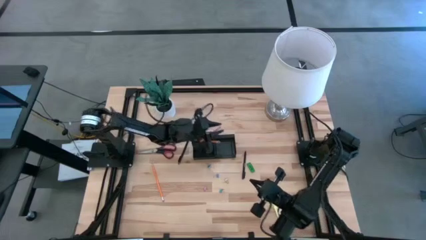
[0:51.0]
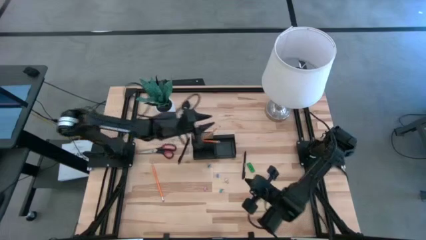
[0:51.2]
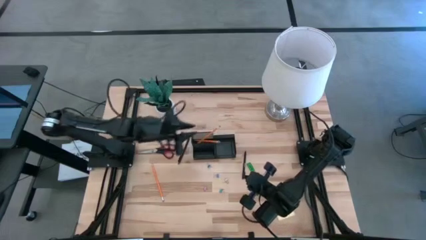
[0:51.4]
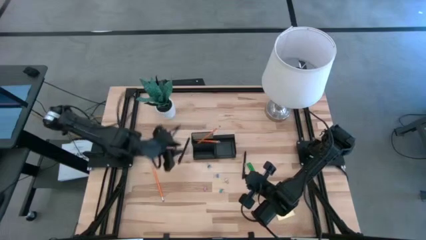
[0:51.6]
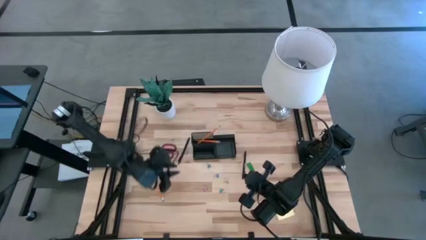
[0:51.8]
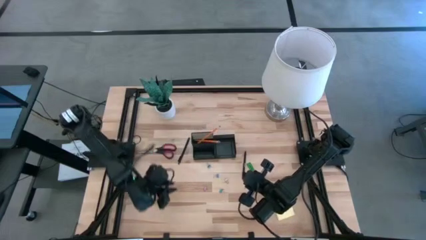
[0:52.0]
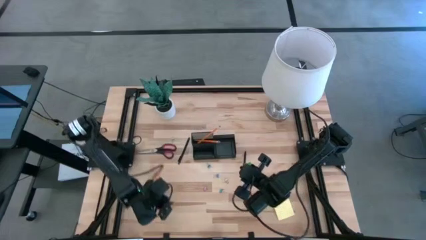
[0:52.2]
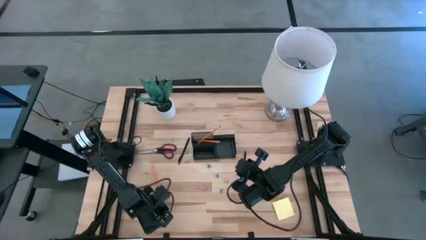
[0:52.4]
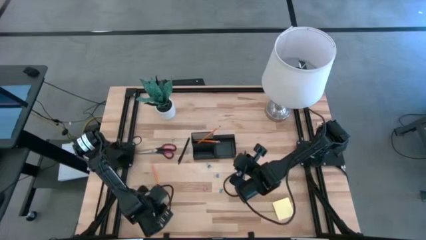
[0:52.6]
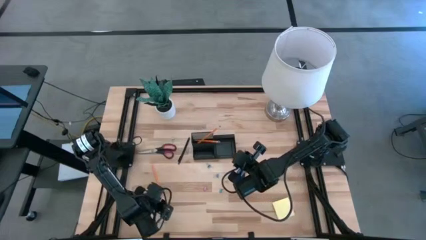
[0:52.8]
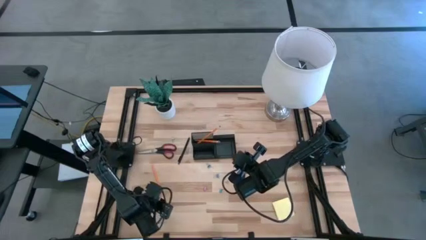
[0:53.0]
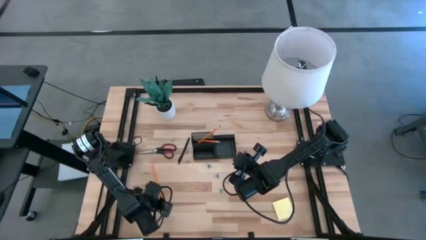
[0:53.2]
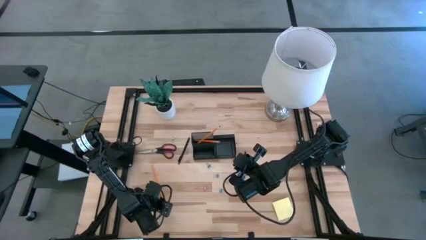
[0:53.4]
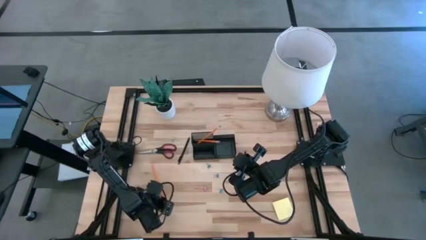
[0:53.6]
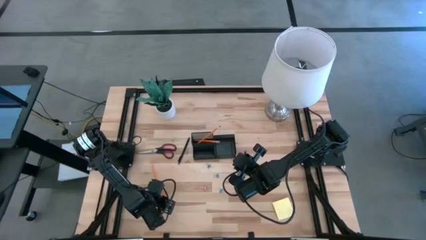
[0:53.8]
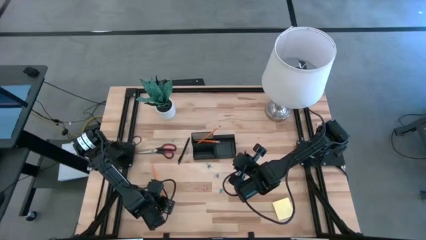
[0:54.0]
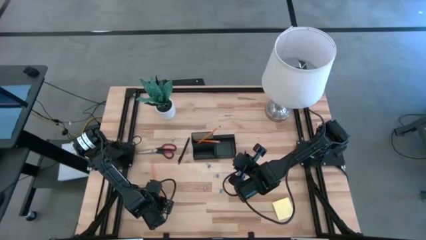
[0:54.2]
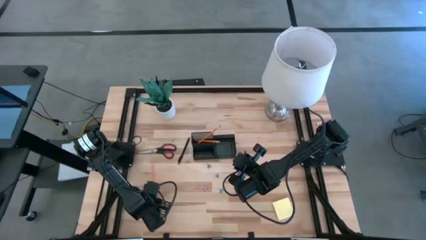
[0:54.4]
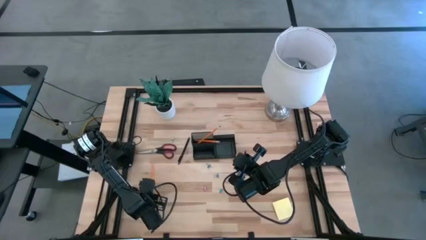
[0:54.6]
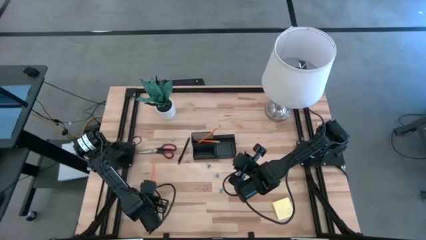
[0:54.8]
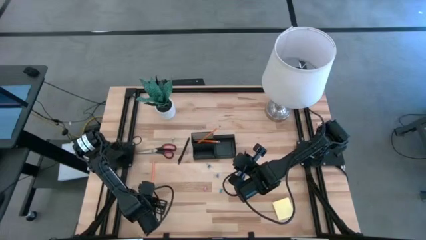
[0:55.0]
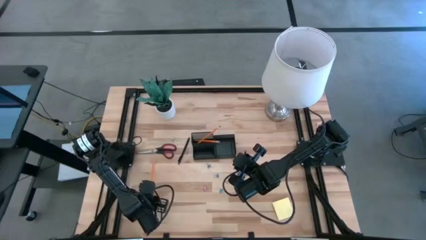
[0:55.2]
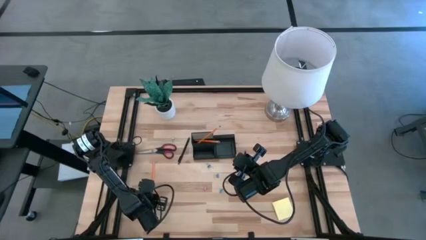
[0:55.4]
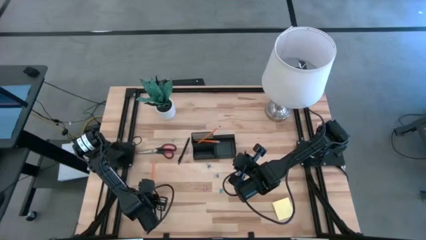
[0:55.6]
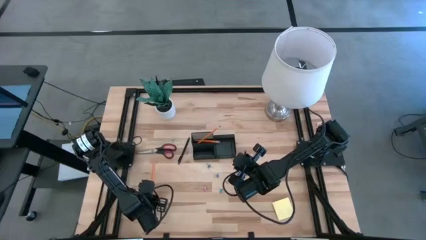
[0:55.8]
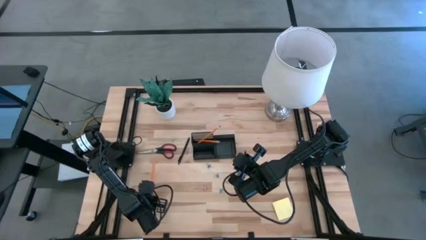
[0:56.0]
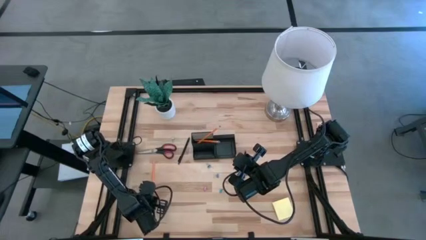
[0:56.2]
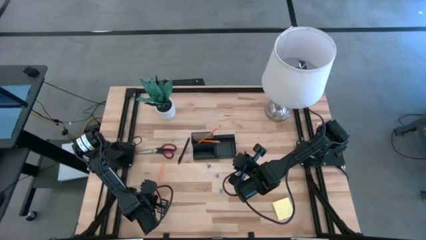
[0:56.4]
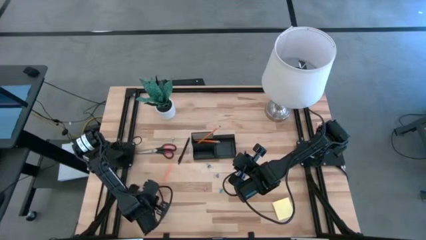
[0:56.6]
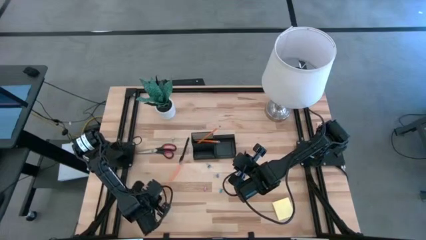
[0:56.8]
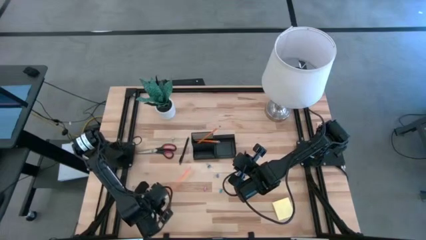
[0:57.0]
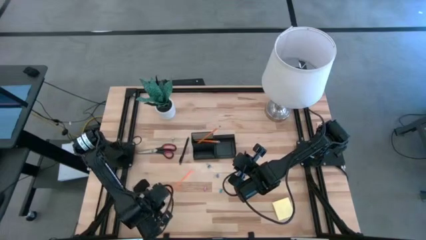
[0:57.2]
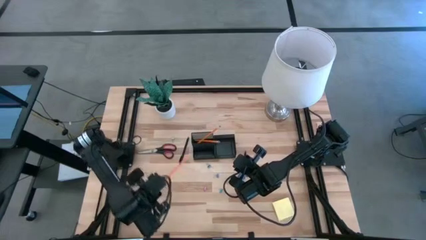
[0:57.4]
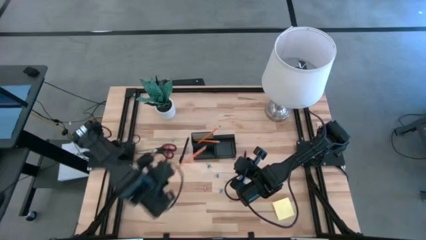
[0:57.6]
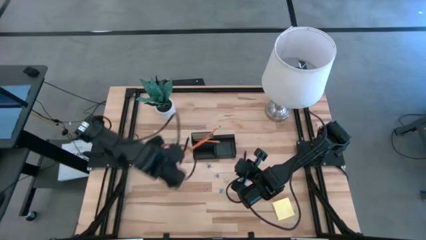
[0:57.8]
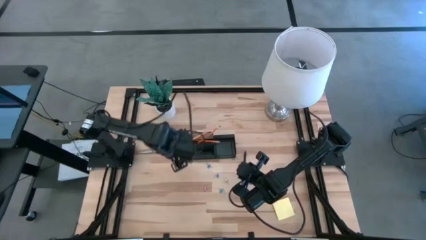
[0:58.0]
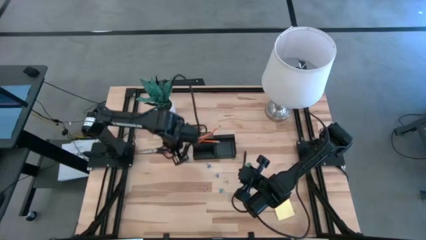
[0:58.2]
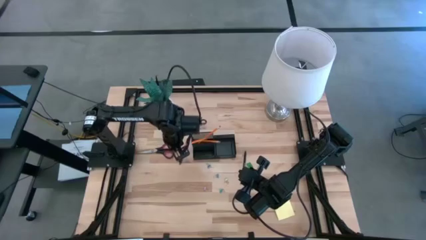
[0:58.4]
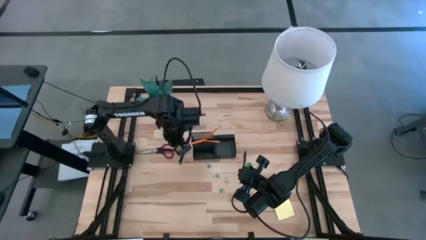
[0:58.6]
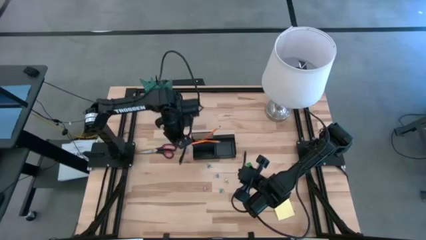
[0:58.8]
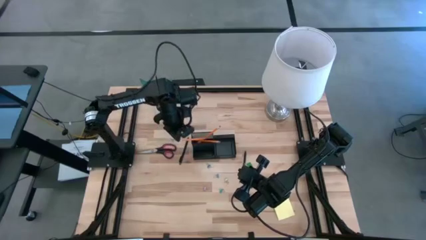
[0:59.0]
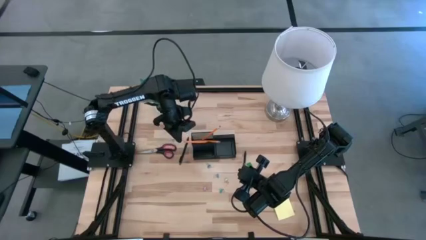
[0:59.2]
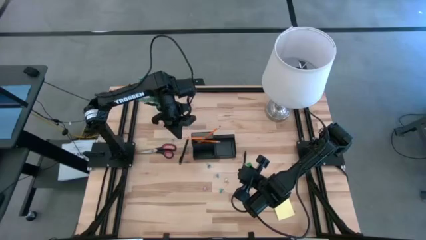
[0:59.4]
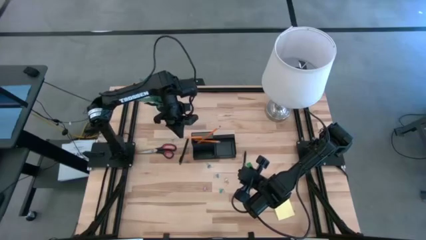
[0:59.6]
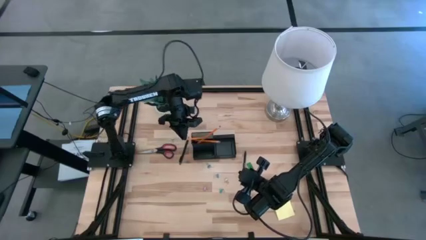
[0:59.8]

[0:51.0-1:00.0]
Task: Pick and place office supplies into organizer
Put the orange pencil into the black desk organizer

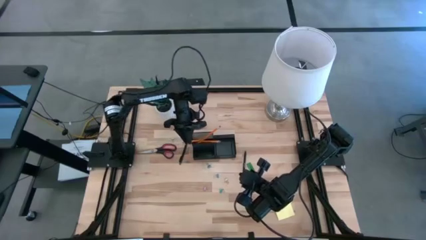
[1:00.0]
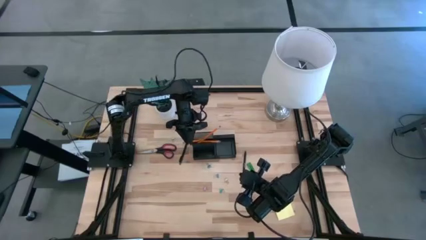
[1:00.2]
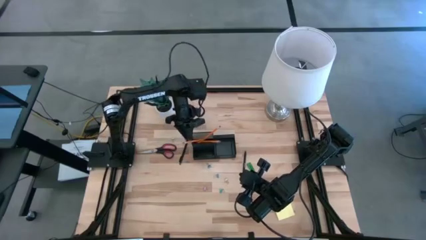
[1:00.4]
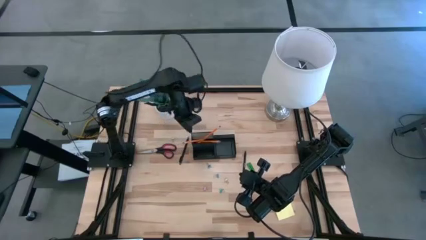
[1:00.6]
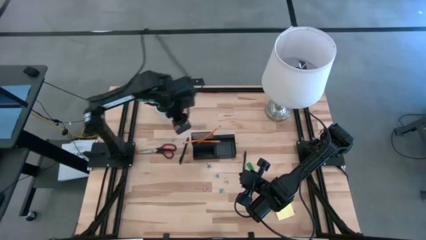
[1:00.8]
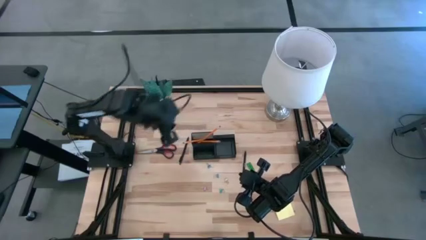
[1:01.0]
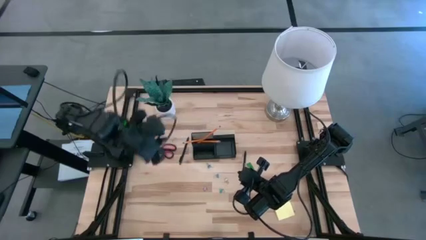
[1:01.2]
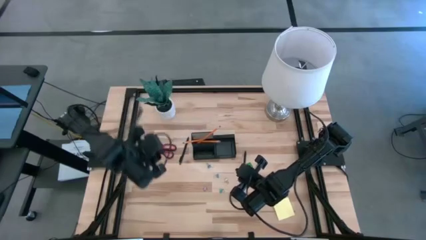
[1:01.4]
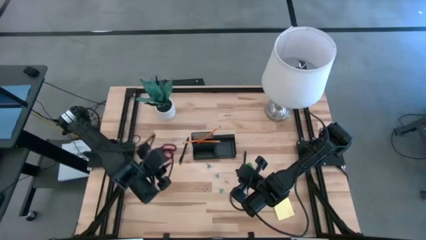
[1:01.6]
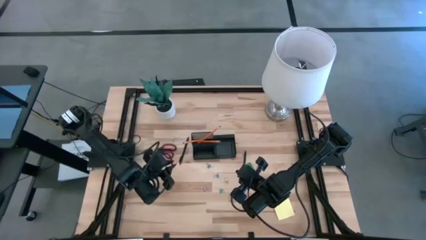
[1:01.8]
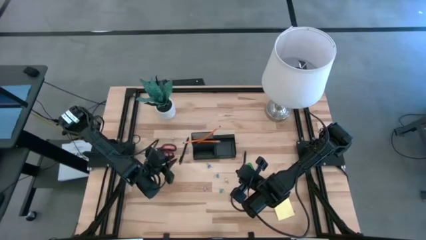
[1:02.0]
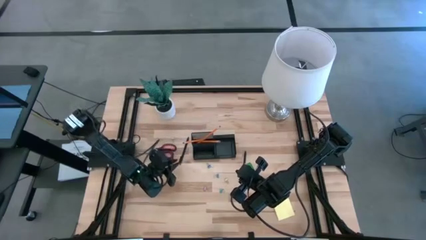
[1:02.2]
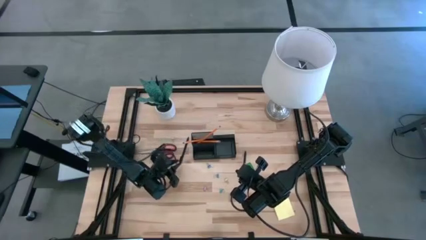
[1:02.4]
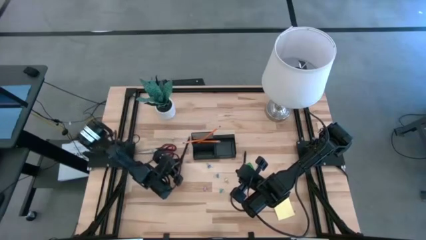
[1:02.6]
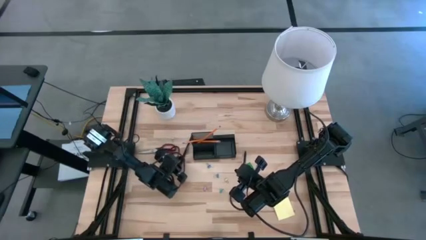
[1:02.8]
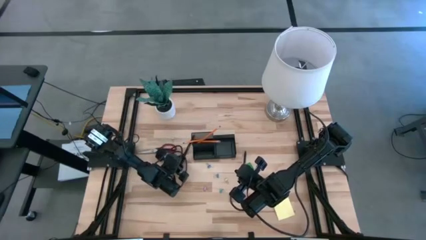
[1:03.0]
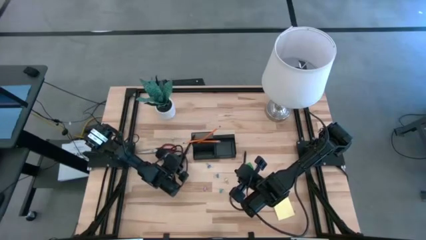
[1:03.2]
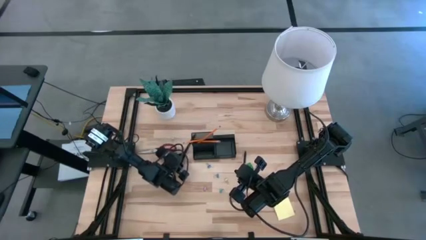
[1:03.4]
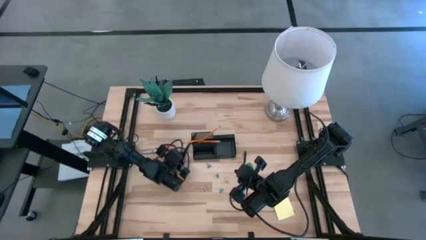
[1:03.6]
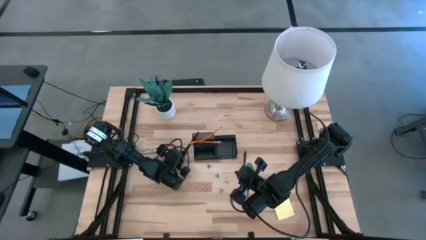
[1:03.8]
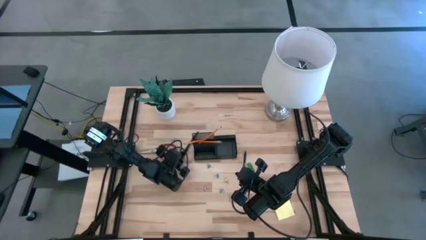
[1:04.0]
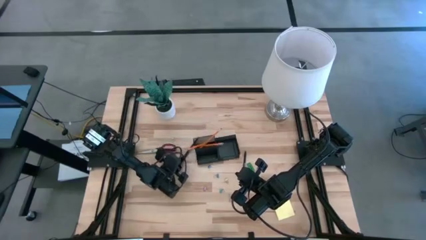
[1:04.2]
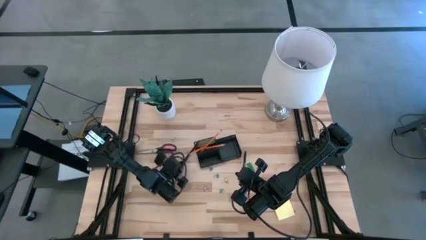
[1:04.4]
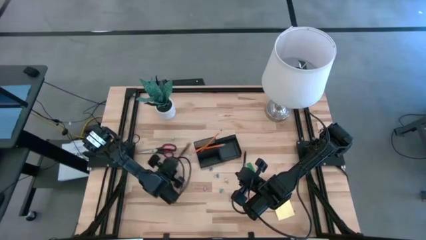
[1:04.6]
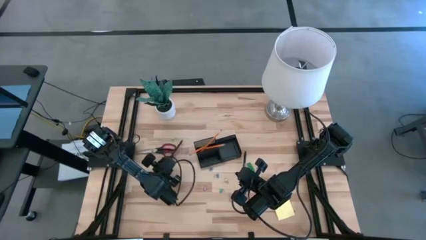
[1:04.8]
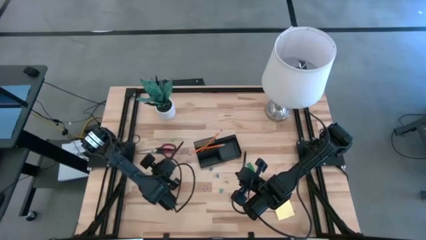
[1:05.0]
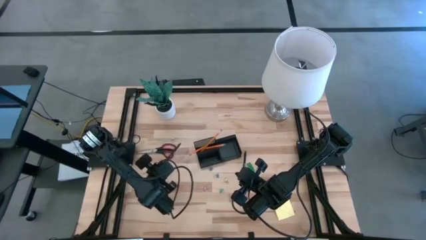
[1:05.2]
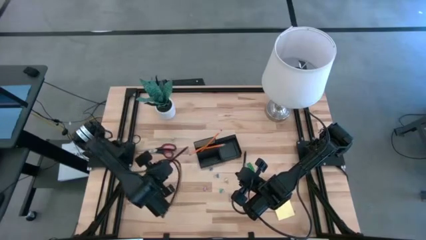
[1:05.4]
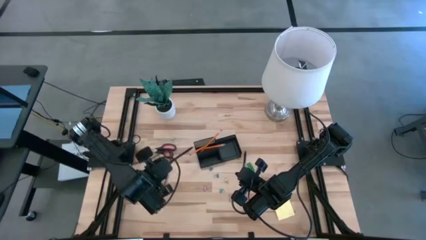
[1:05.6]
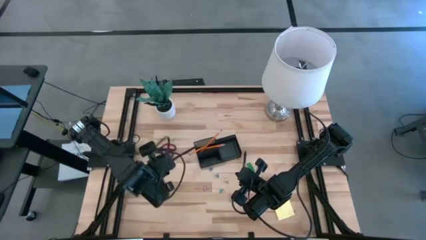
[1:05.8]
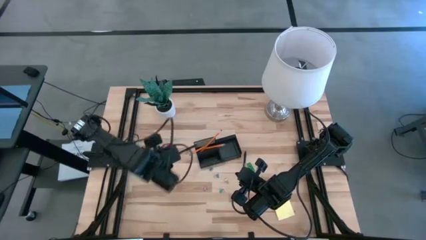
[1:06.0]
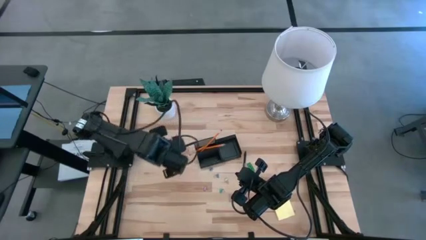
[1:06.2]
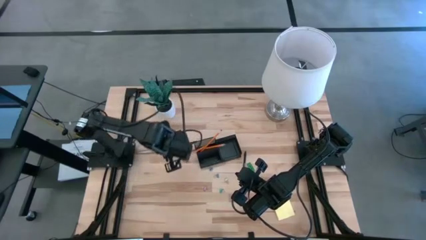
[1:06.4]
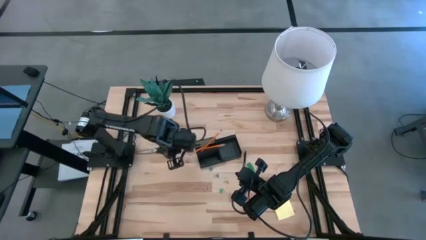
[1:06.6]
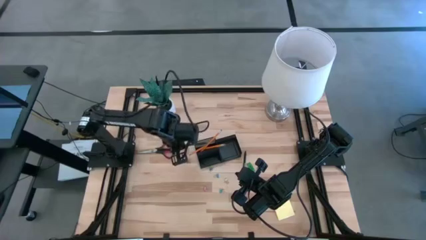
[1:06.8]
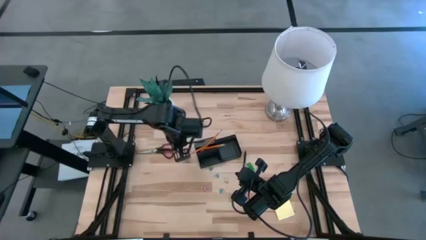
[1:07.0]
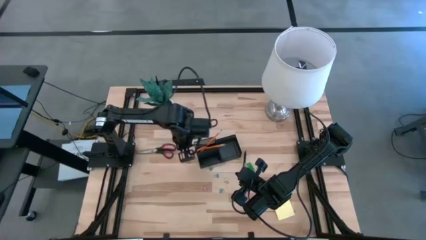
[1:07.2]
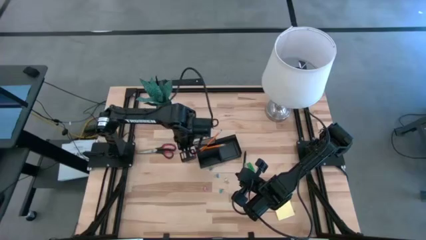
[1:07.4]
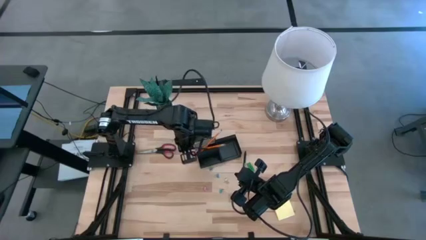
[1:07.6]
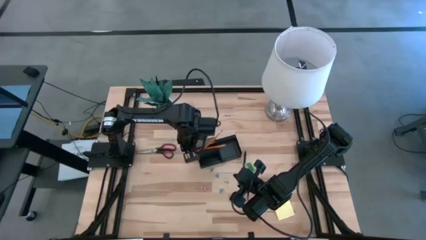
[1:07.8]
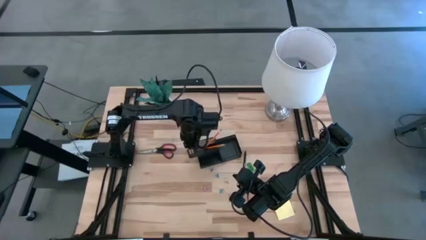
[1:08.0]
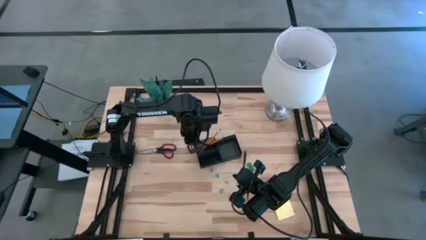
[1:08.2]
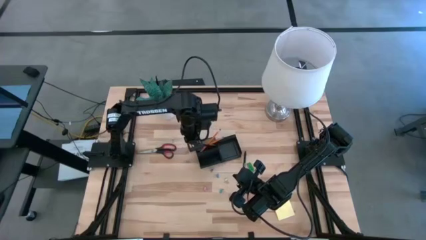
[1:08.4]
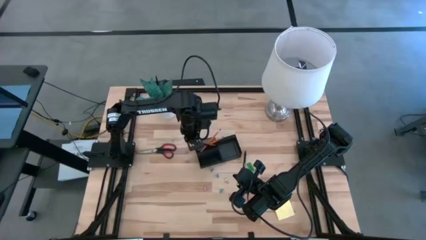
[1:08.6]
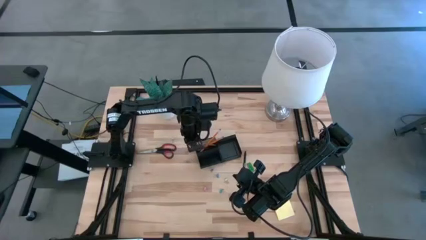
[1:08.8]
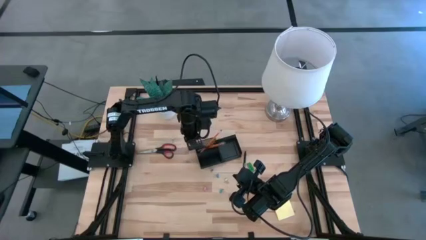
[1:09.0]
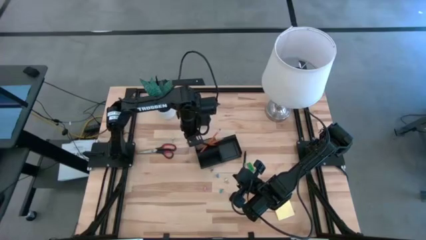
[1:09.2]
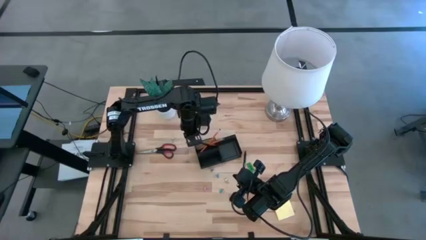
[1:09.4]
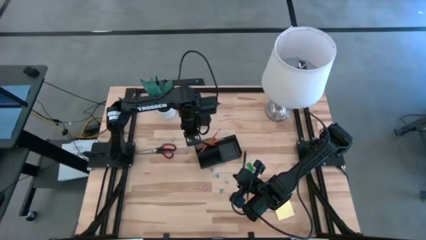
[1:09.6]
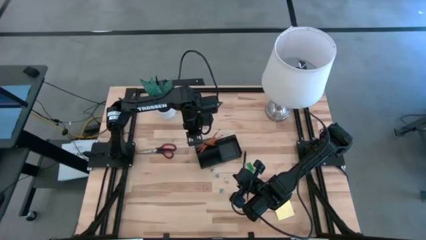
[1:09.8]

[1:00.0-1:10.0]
Put the left black pen into the black desk organizer
